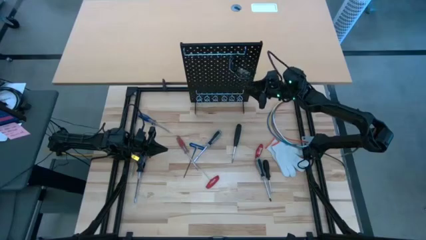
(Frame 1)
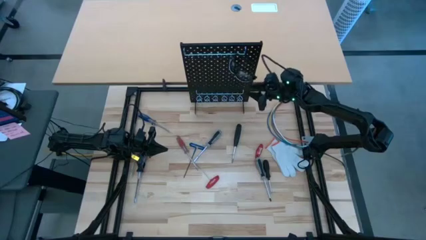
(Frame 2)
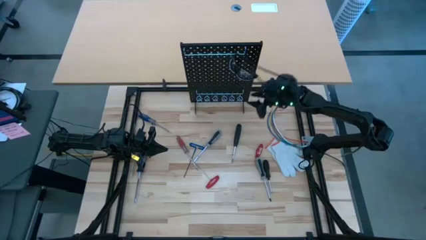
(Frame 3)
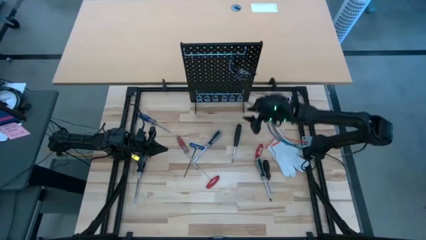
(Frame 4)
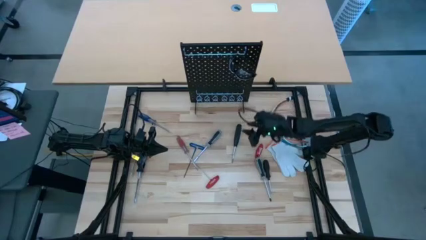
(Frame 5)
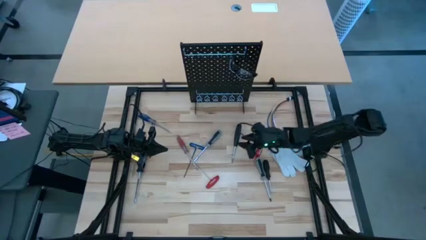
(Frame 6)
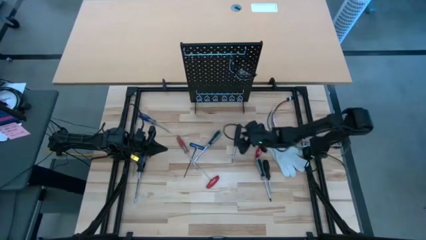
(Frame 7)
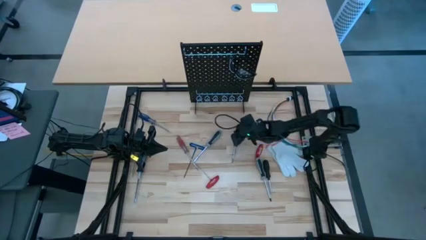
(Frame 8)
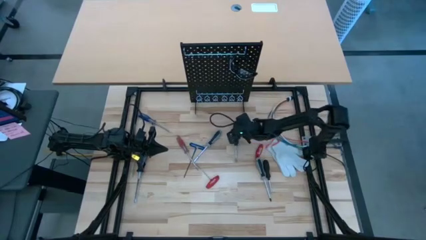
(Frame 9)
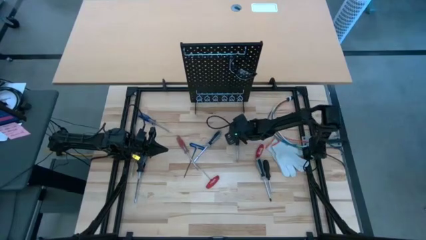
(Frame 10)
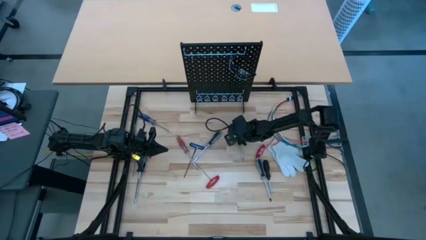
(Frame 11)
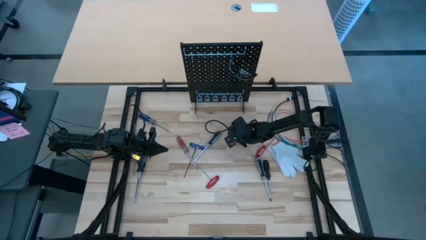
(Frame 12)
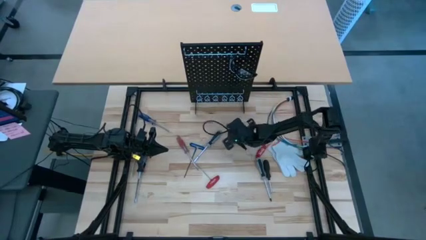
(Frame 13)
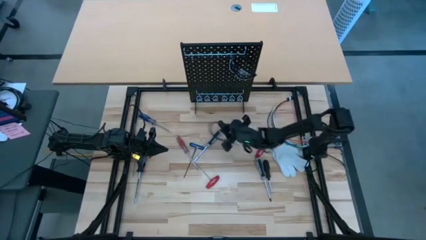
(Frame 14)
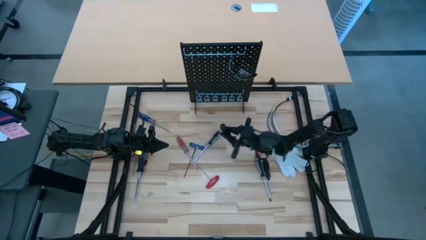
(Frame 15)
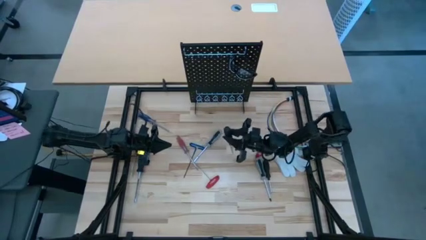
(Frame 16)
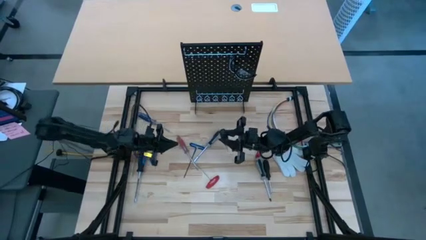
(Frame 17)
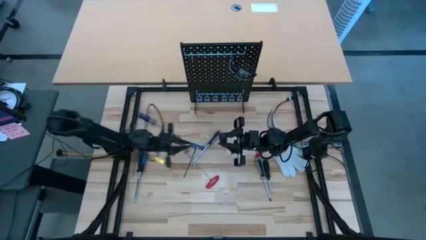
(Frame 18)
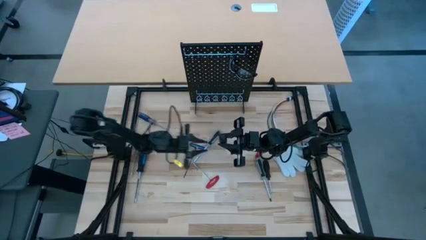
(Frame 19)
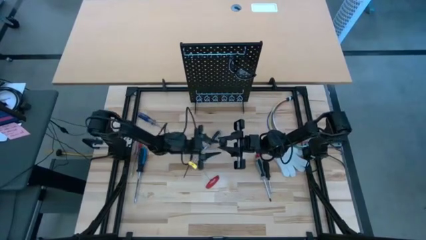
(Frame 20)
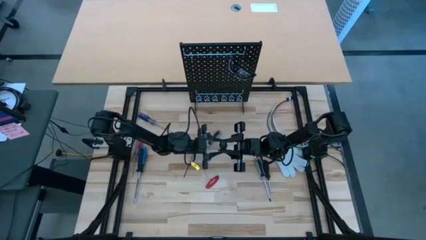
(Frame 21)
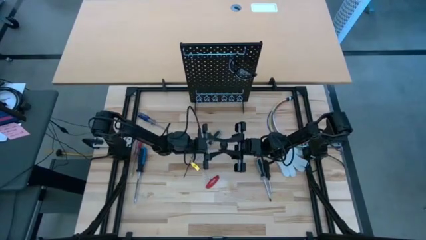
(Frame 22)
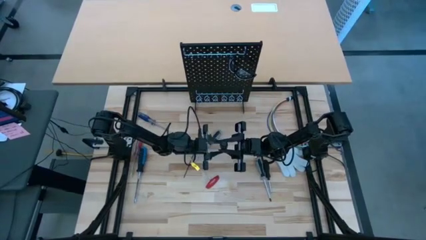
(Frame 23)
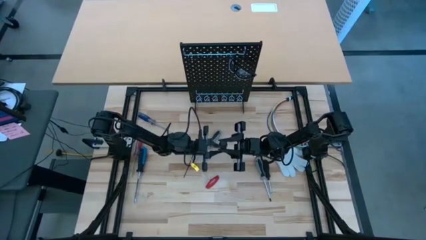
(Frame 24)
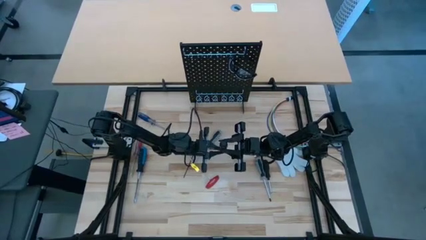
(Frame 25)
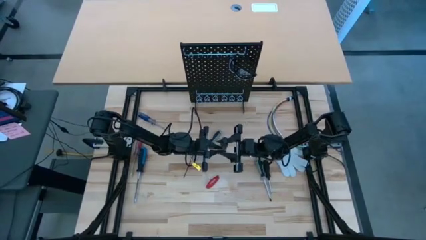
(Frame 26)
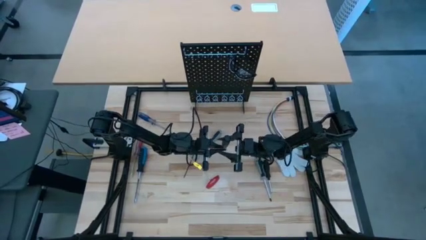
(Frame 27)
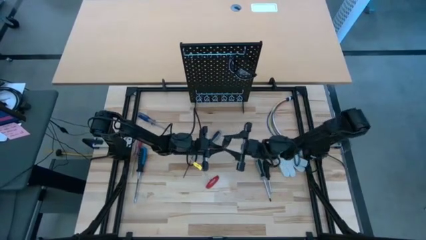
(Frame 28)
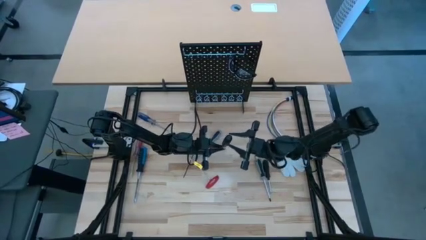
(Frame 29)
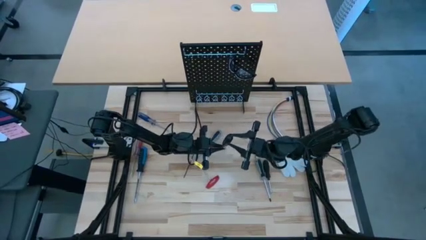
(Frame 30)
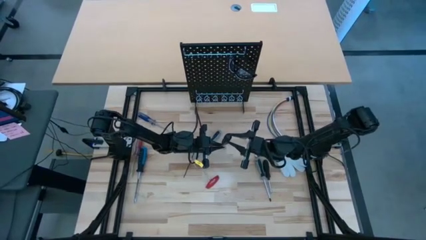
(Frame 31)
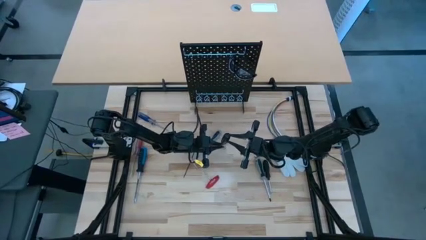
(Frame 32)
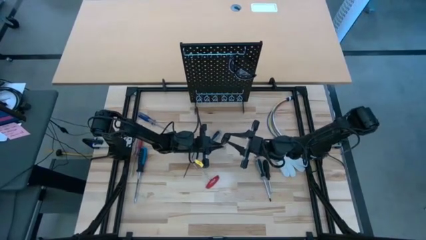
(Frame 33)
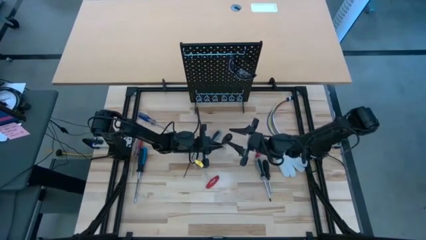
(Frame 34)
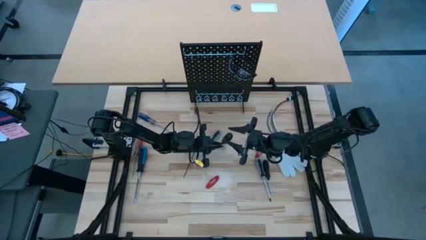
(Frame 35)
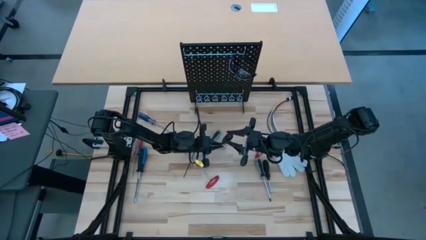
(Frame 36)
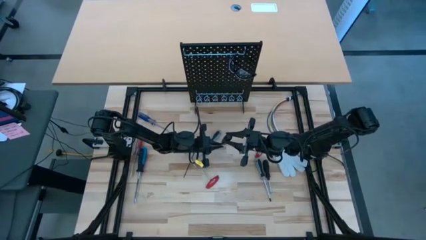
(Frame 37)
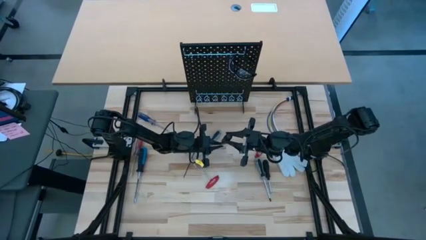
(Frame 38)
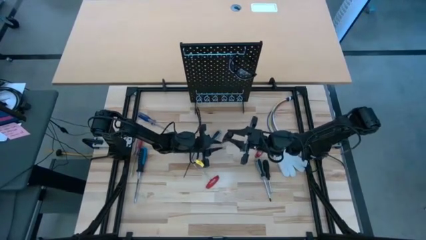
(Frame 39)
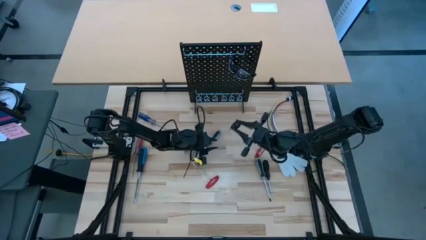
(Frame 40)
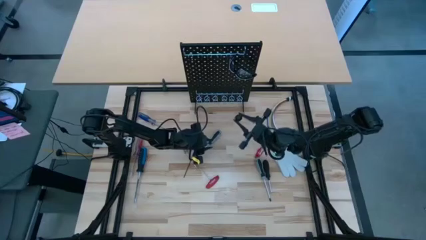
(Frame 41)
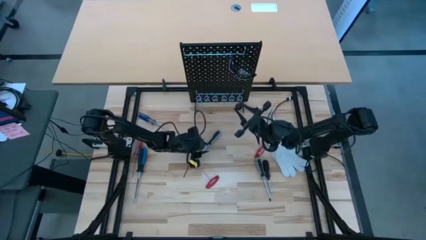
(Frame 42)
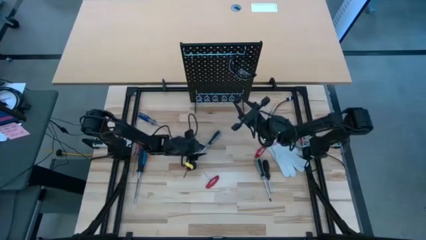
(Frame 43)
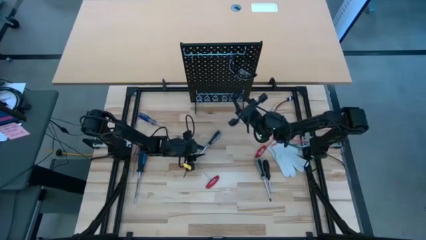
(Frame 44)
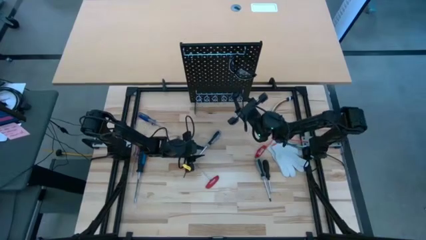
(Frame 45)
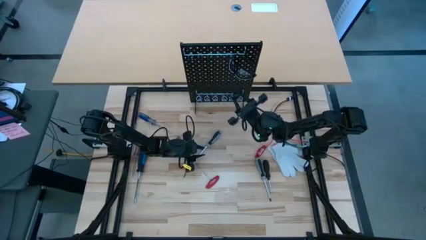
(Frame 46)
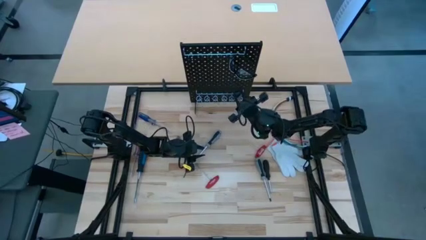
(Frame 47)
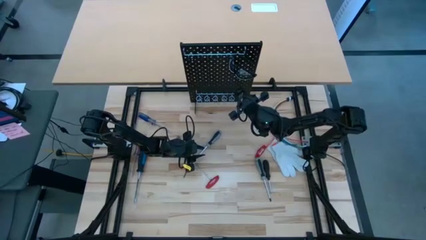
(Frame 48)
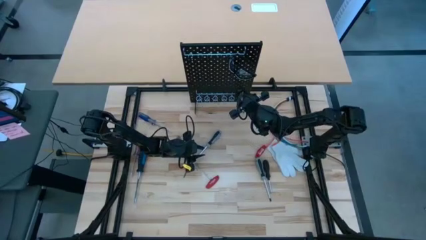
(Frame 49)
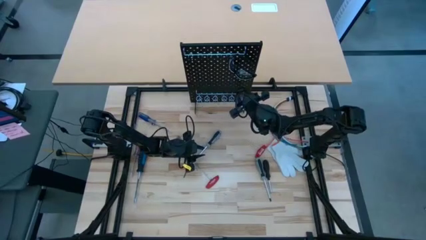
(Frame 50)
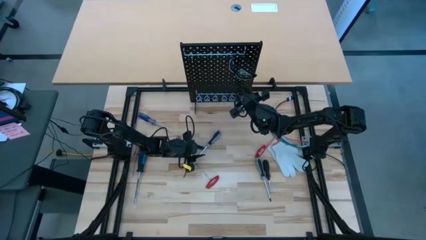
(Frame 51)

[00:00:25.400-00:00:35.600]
Task: Hang tools onto peg board
Hang the top black screwdriver on the pegboard

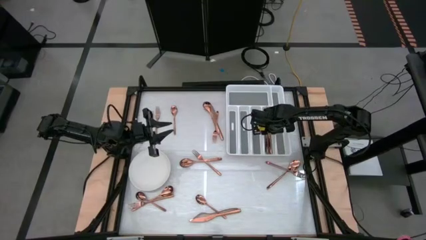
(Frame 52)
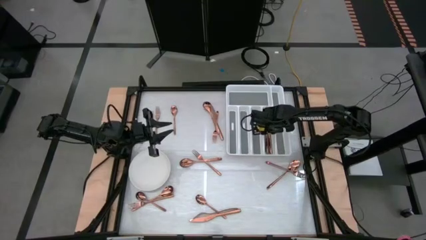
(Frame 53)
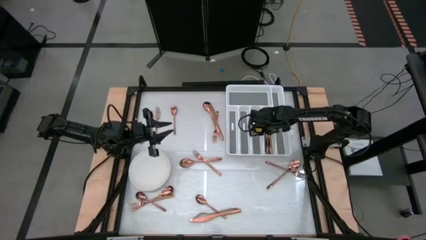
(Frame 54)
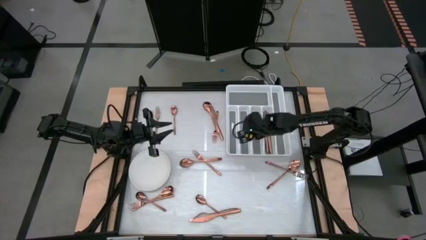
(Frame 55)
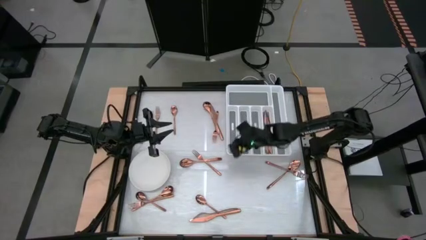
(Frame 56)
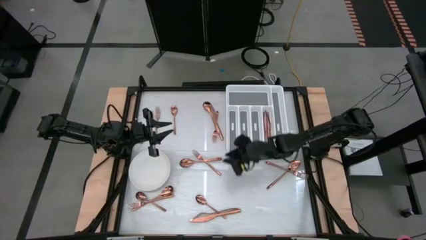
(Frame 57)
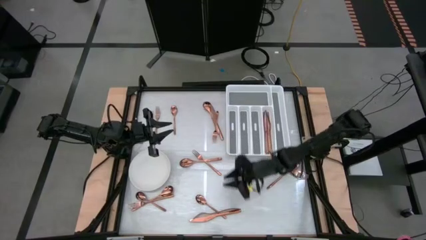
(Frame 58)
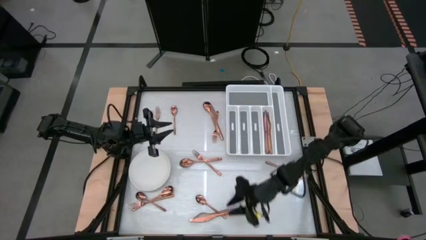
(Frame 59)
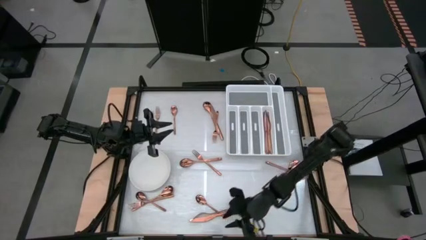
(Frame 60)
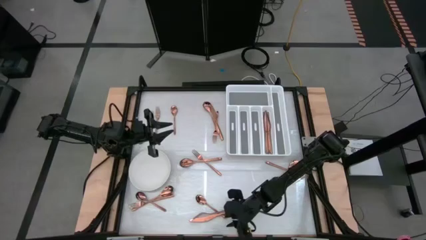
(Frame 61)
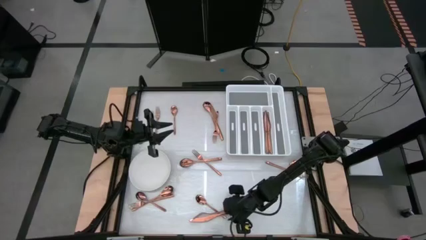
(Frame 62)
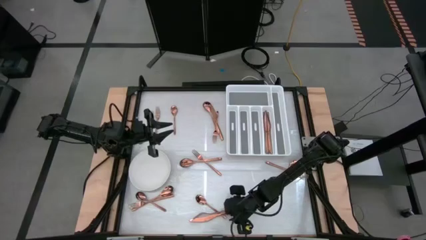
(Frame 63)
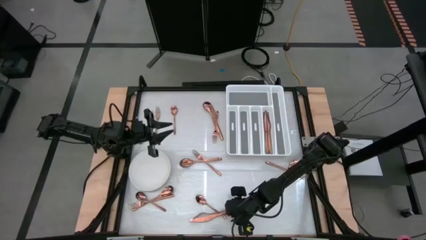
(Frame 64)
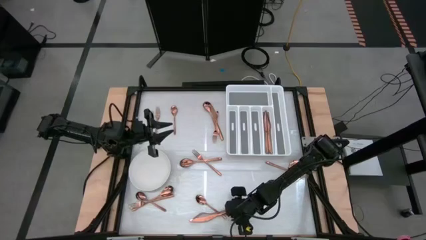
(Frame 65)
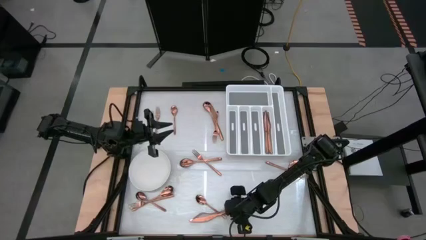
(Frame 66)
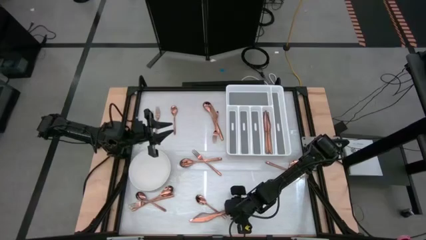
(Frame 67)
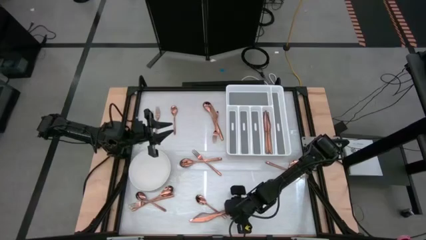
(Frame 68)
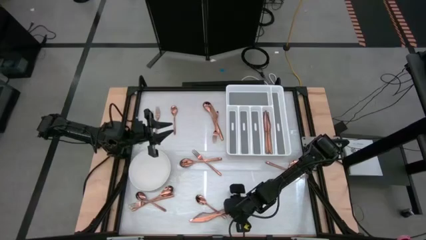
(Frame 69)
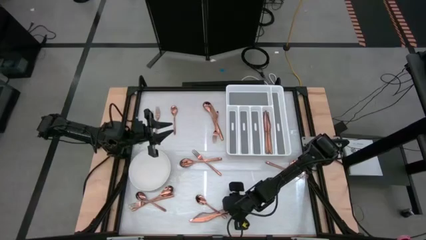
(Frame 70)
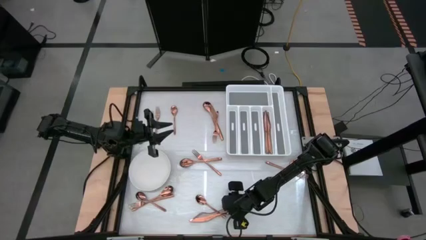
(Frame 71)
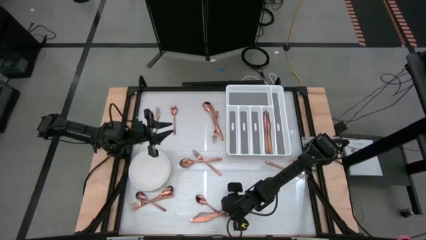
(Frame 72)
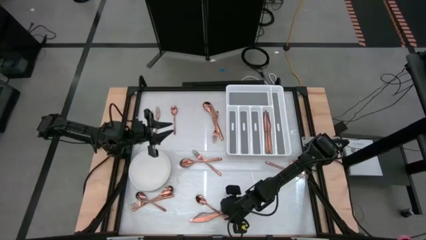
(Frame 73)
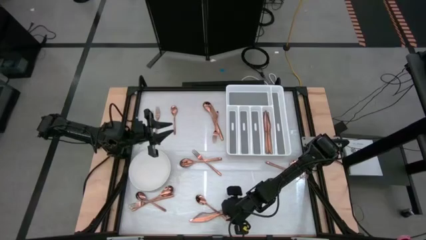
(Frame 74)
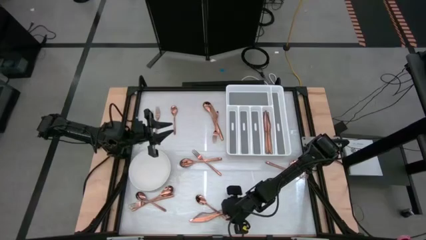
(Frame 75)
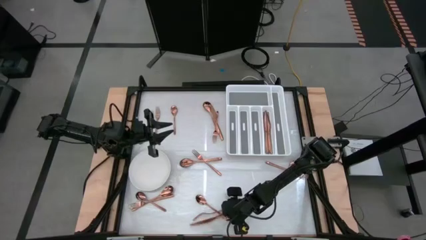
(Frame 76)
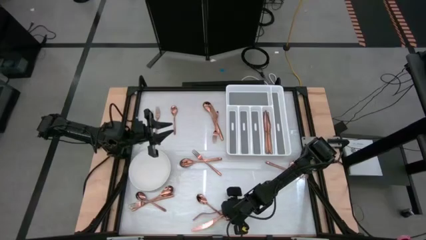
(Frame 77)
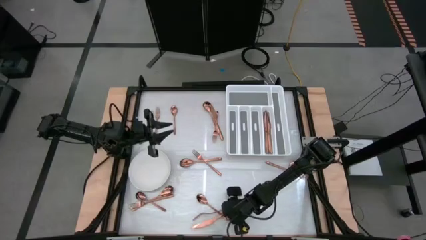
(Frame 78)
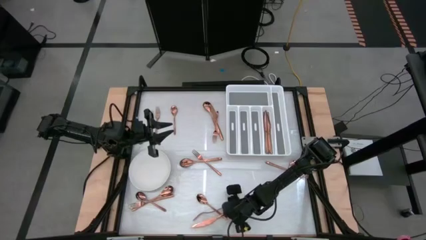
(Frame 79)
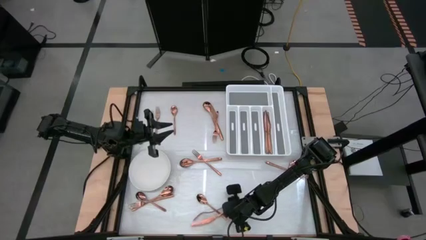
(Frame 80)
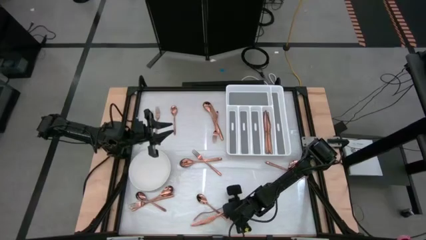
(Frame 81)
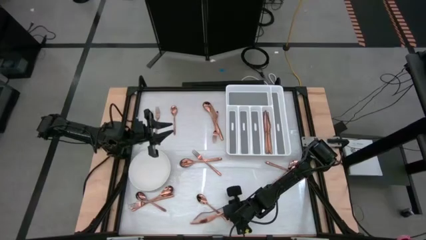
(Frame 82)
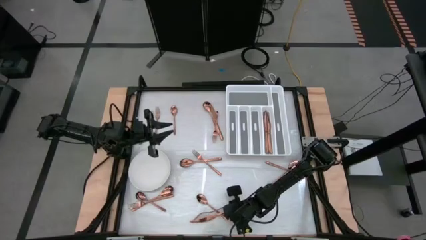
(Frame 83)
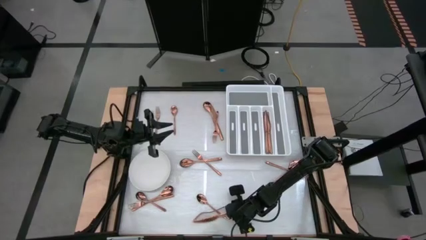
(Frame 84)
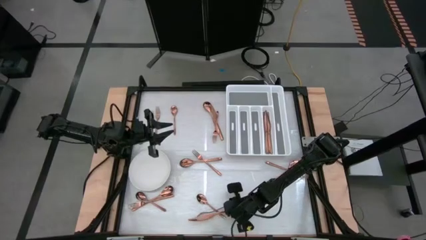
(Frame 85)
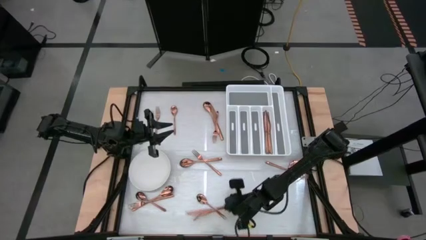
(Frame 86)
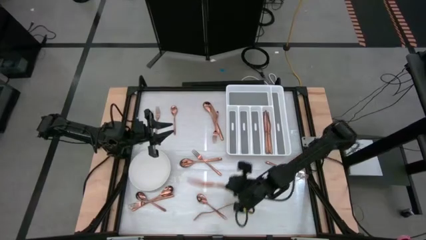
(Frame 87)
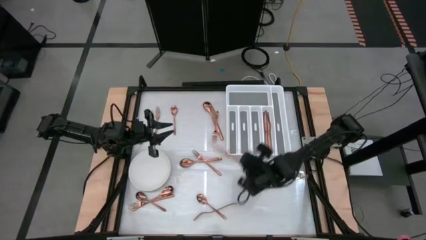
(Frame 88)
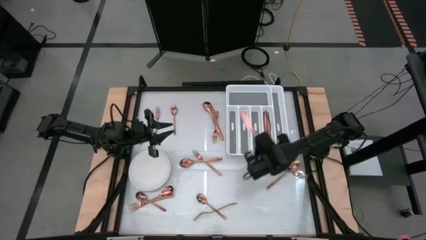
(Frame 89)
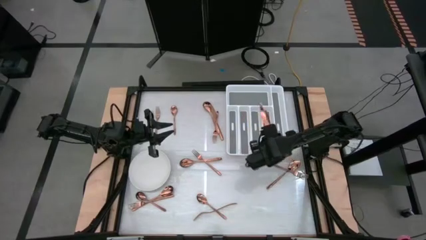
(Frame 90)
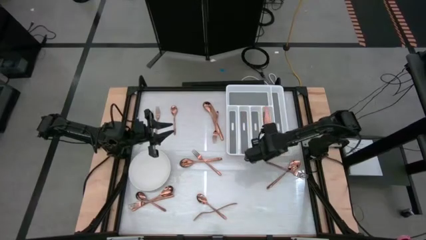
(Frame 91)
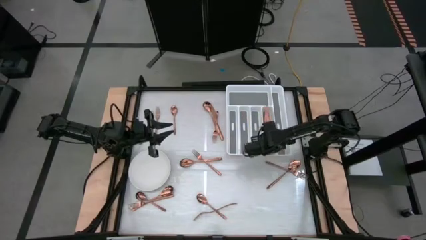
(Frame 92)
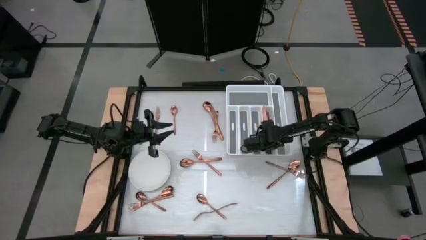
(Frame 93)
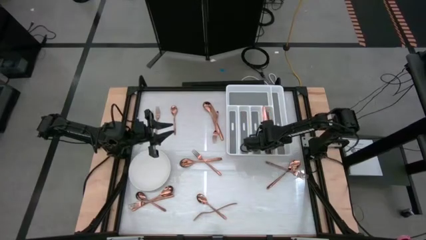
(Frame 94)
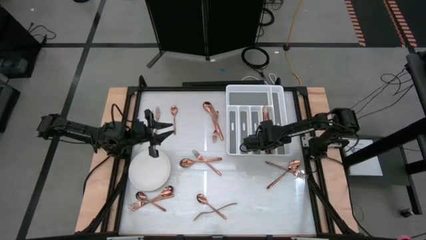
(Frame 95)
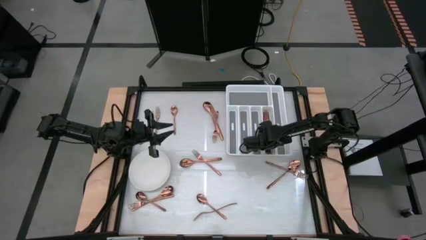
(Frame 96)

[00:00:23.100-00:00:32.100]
Task: Sort silverware
Put the bronze knife into the silverware tray
